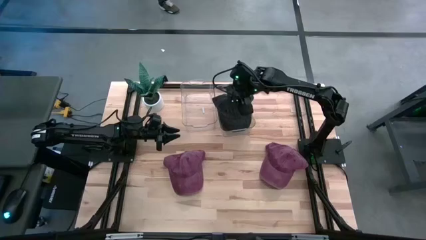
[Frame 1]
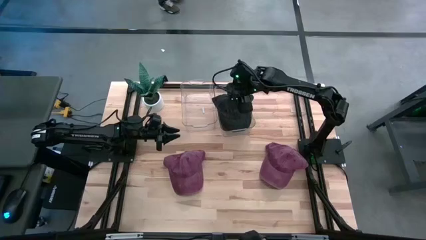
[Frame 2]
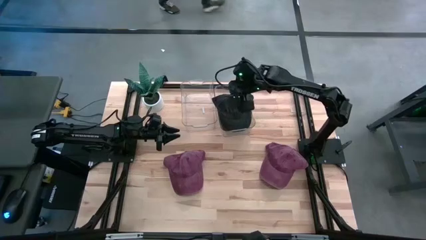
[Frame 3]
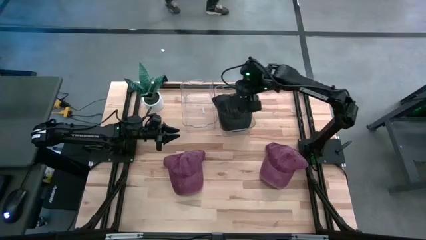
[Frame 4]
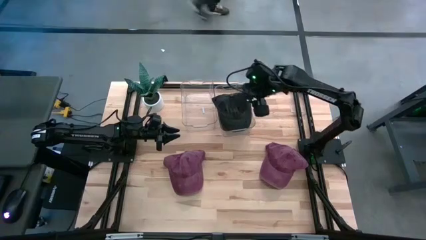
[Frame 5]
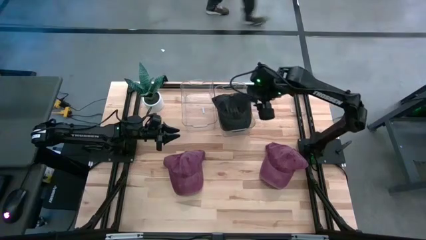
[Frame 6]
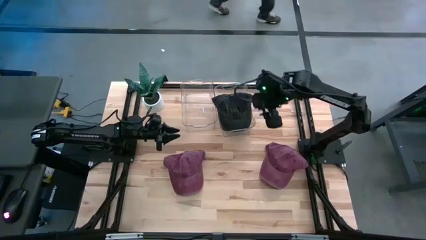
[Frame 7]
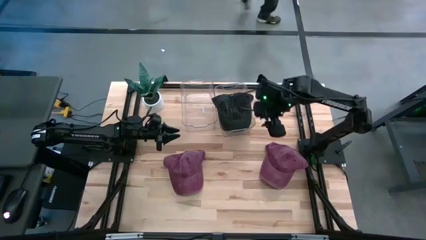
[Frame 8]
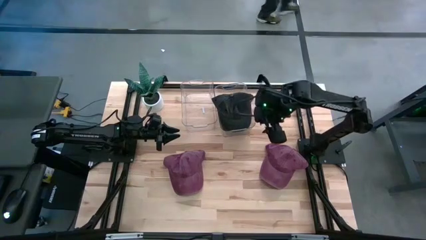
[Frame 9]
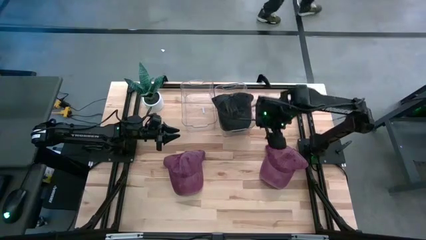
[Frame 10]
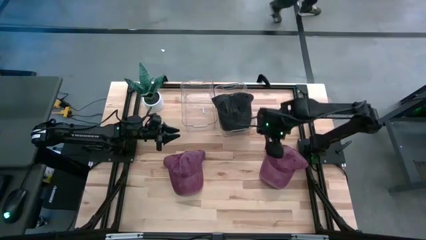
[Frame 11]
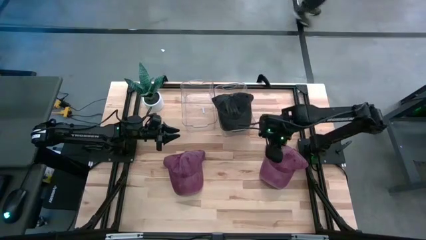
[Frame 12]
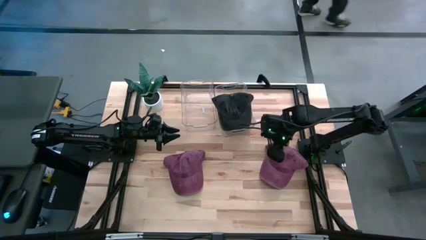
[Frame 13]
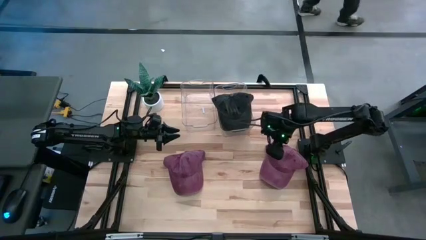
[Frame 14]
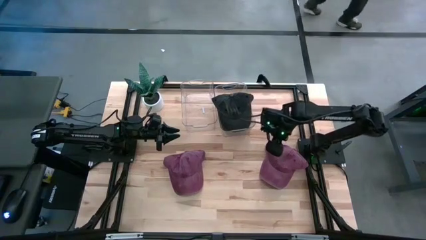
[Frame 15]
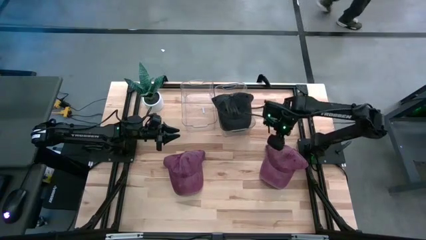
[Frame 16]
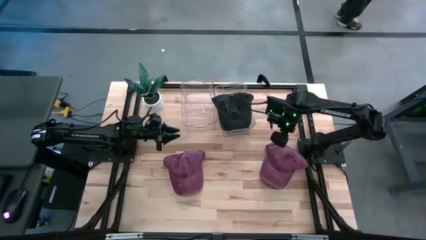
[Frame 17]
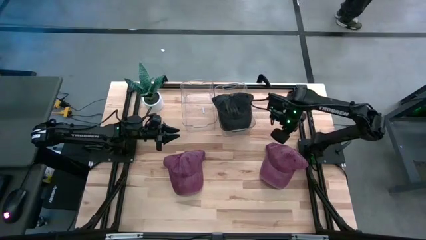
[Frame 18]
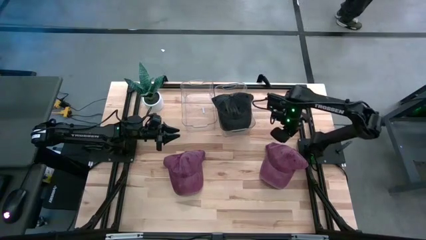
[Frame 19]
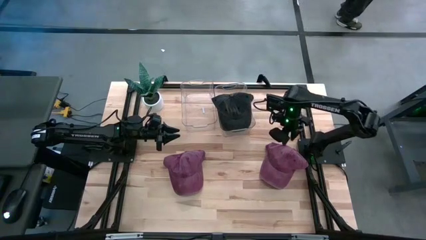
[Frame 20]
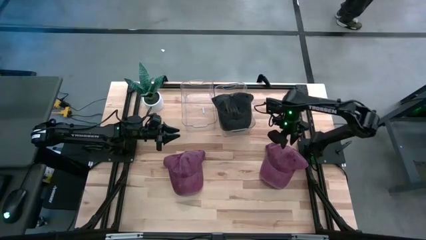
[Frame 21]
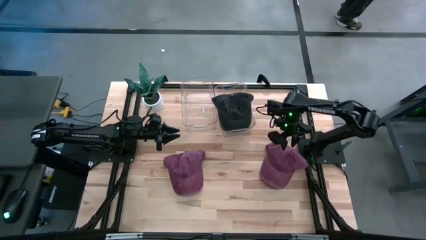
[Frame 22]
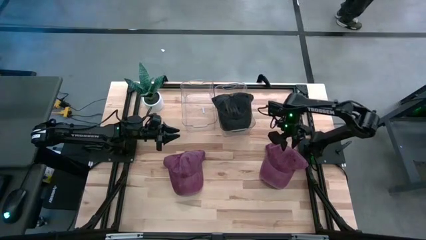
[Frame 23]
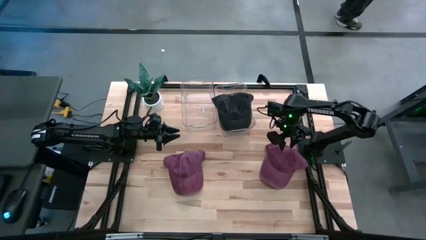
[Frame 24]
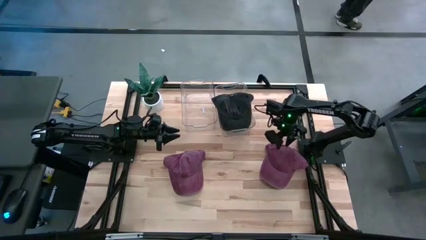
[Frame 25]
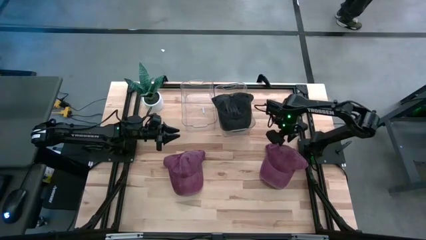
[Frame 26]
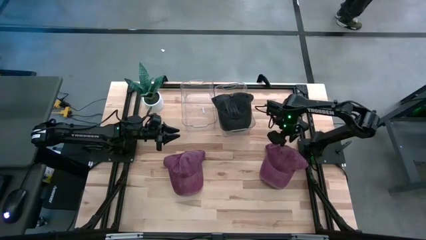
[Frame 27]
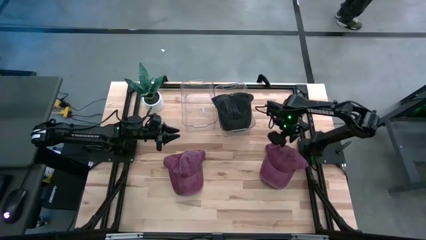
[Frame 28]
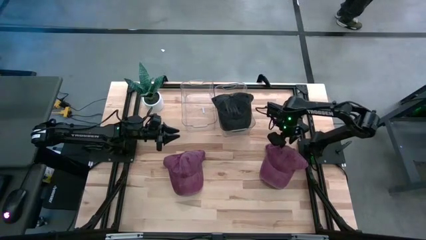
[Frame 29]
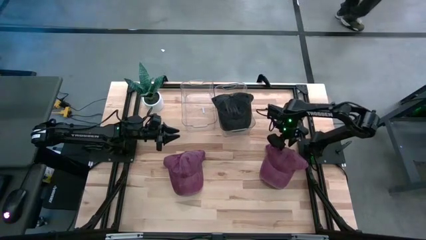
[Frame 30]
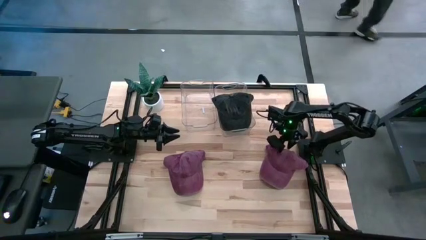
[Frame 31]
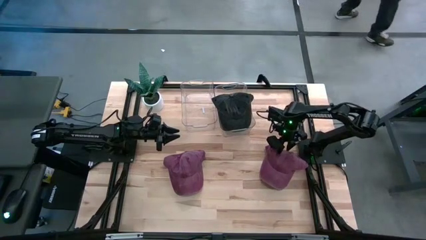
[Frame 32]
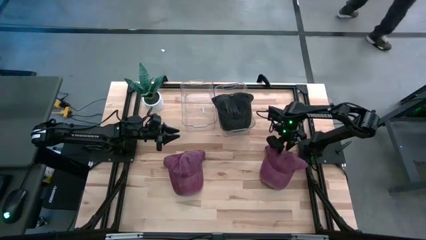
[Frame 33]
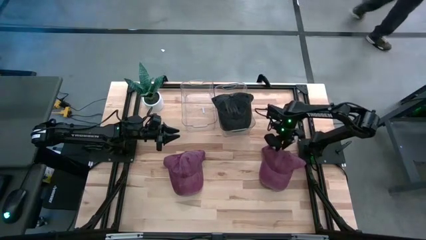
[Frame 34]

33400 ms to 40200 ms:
Task: Pick & Place hat
Put the right dark red cap into the left transparent bin

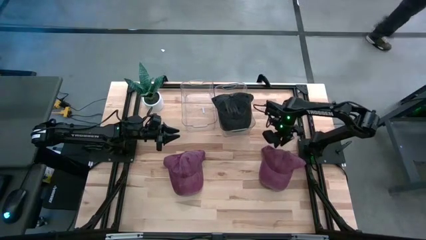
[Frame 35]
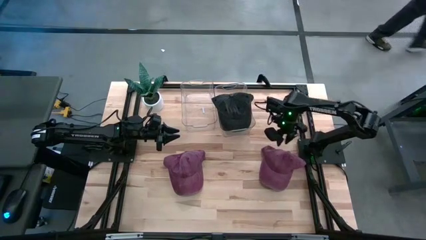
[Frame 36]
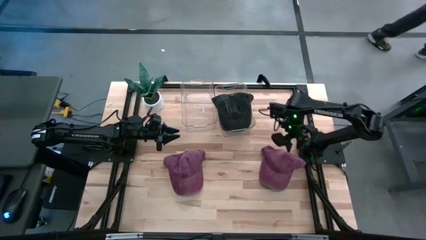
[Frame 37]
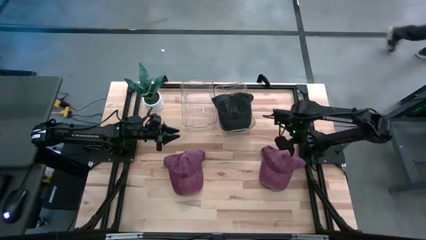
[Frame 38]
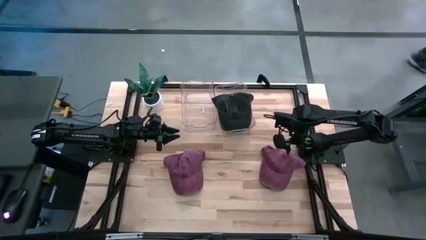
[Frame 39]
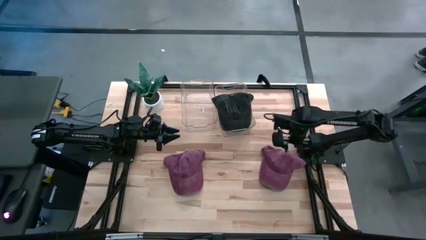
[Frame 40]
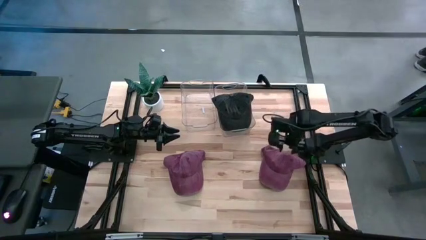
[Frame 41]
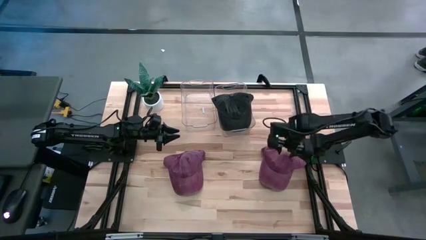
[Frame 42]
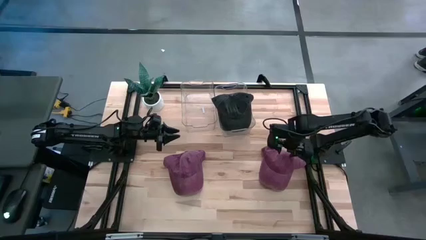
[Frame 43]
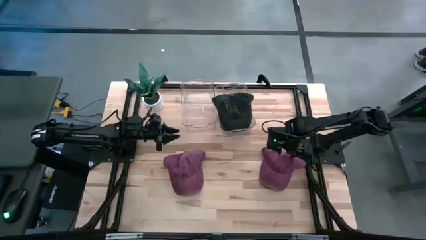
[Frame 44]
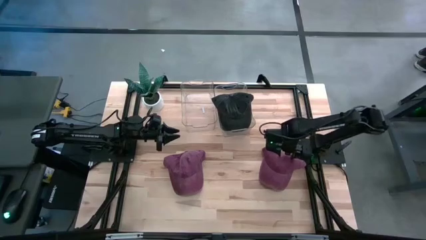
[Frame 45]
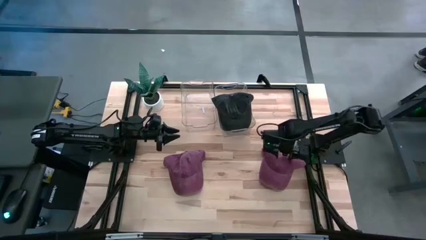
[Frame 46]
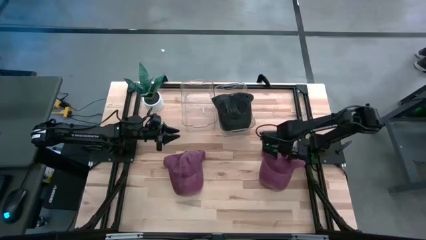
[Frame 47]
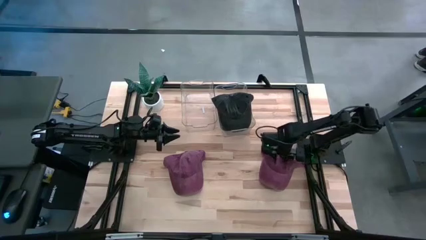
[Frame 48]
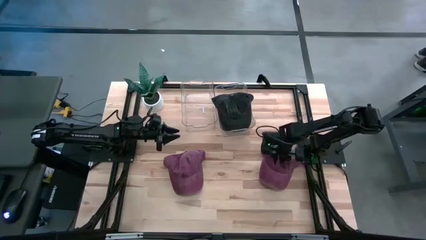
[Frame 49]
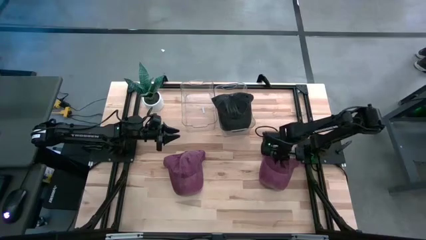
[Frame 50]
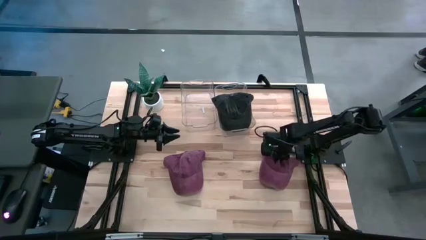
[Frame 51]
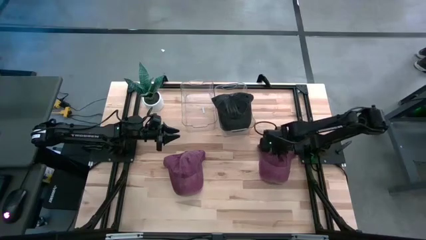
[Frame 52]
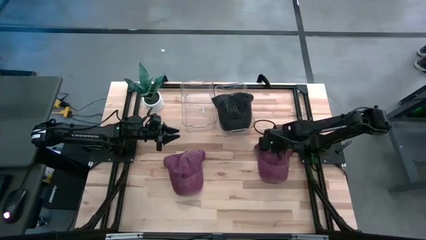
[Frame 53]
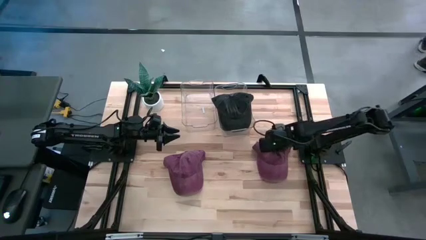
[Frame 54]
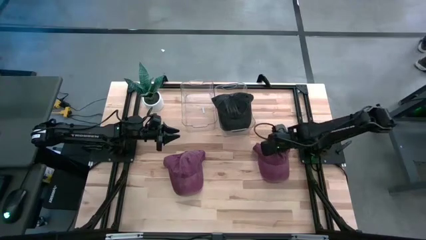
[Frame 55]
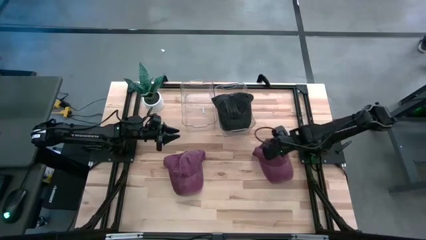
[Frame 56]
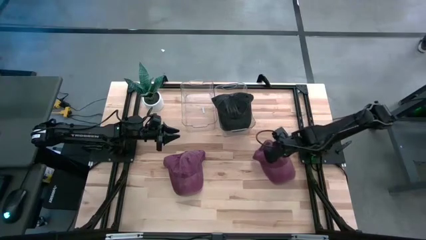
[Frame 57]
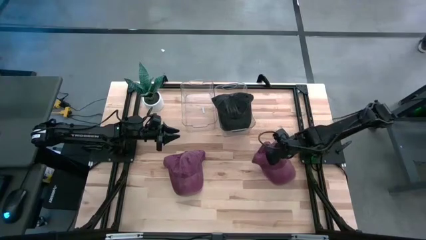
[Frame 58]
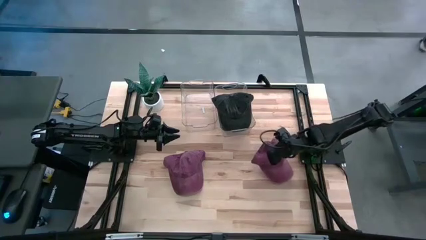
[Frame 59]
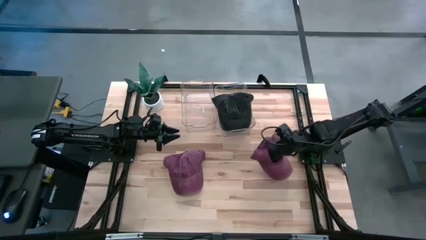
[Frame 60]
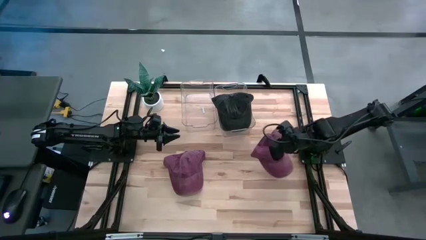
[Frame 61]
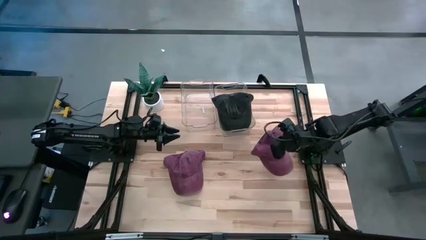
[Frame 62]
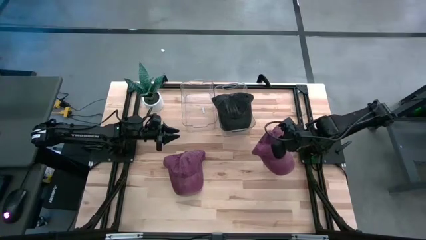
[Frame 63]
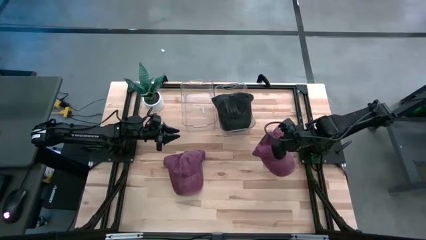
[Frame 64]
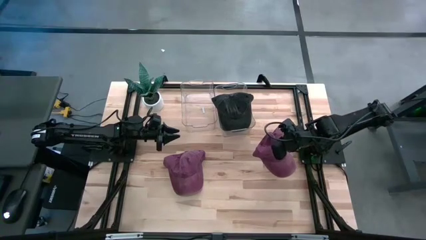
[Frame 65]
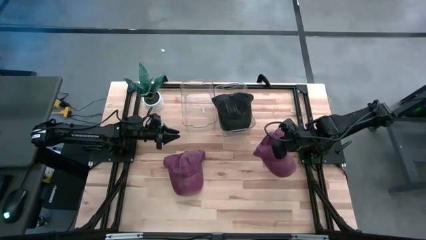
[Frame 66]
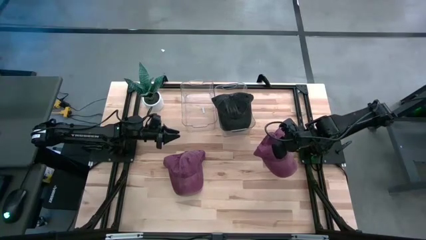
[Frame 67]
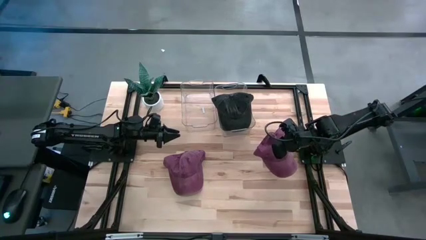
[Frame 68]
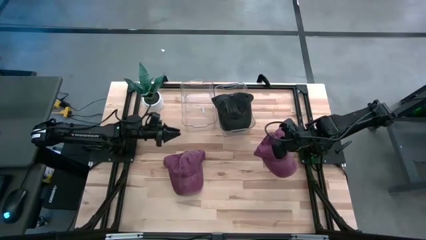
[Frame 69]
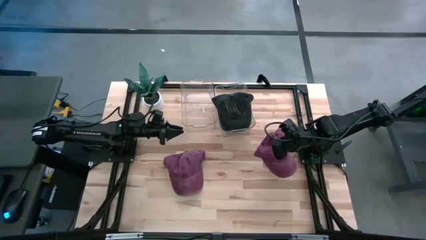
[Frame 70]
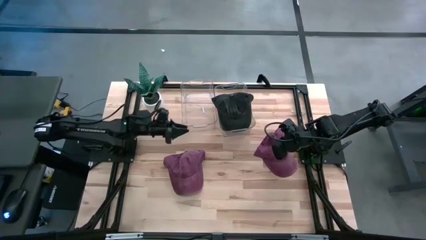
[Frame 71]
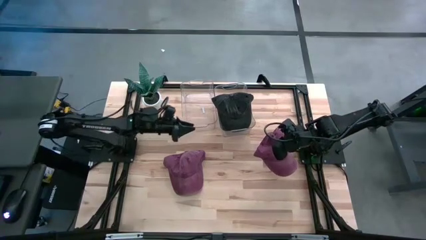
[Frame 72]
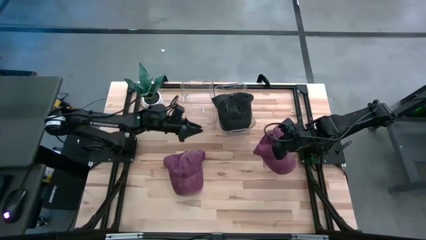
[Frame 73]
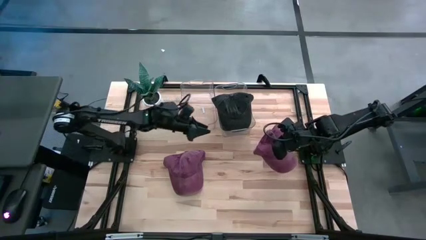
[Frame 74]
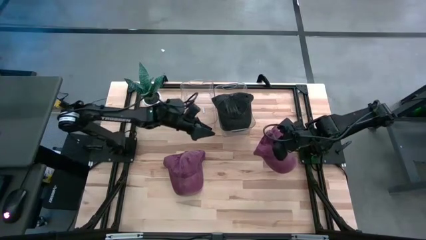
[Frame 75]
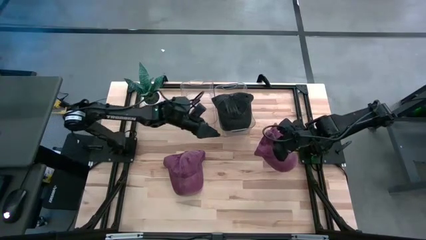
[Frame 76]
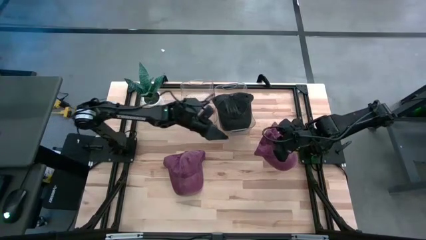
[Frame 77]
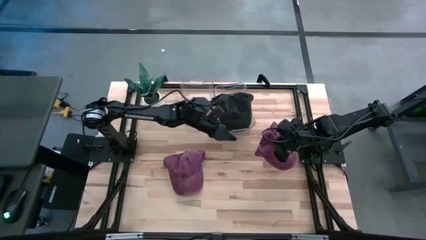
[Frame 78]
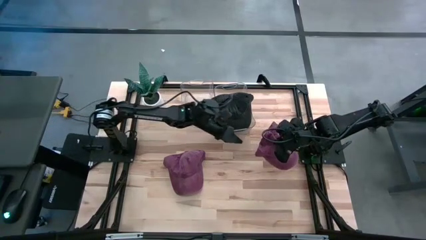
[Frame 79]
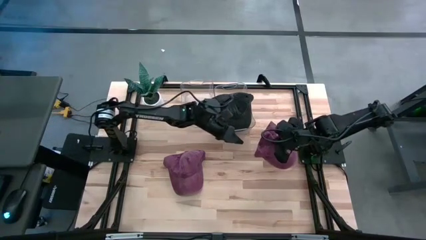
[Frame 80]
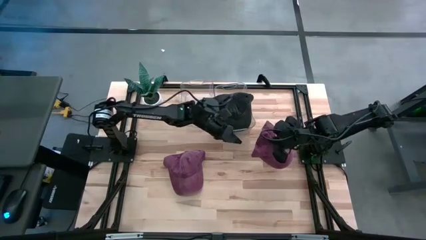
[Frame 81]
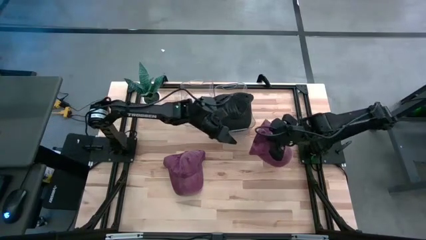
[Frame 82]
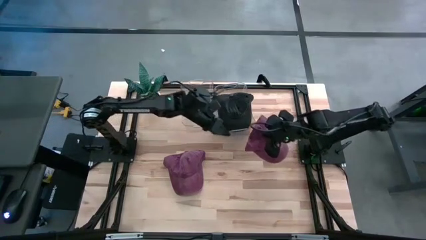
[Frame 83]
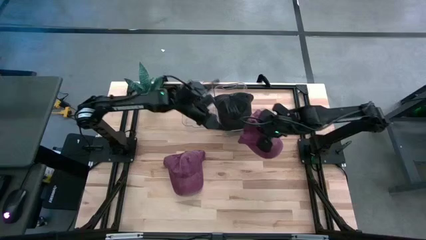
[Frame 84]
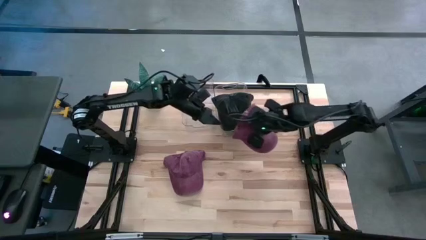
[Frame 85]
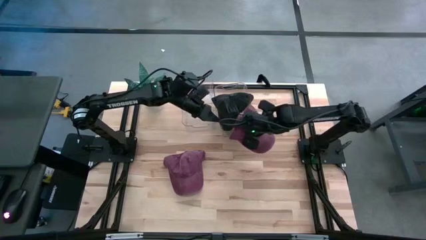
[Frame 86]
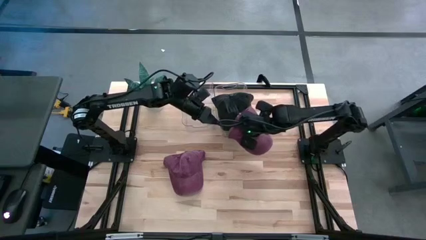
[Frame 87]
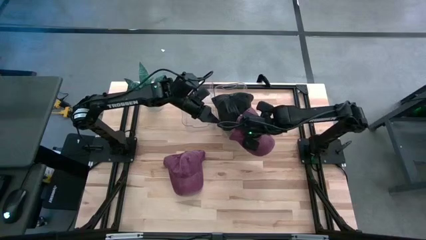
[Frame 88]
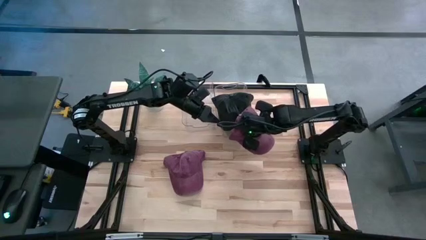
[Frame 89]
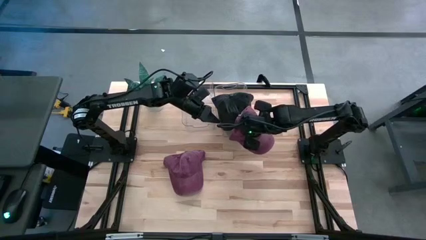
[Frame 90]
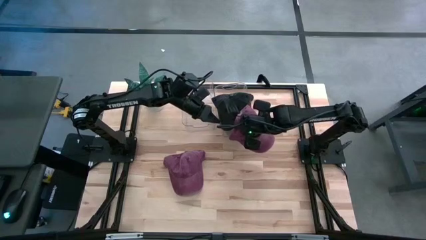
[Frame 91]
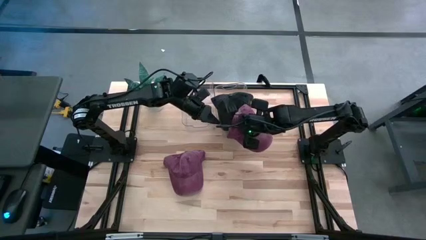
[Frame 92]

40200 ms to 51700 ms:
Put the right dark red cap into the left transparent bin
